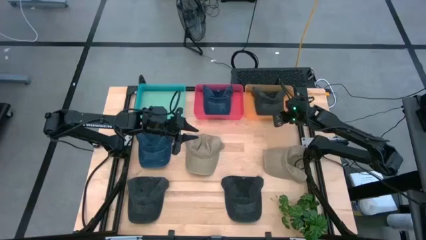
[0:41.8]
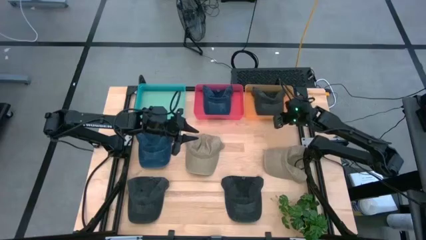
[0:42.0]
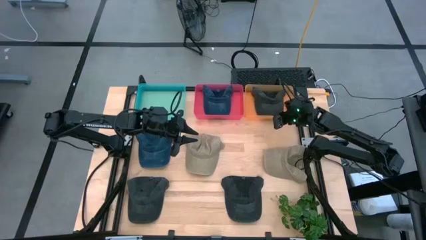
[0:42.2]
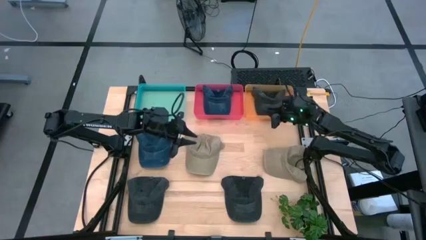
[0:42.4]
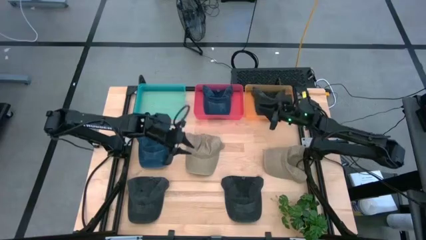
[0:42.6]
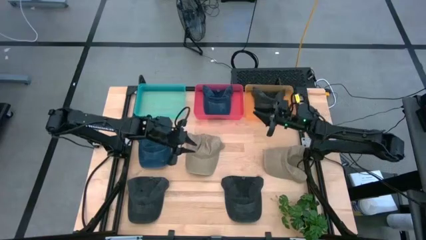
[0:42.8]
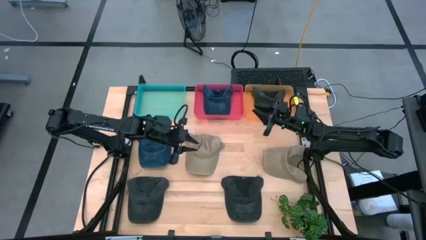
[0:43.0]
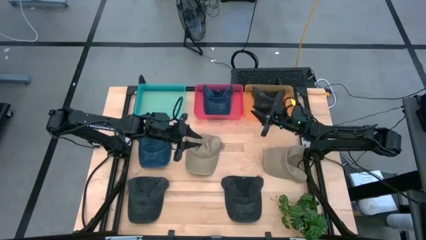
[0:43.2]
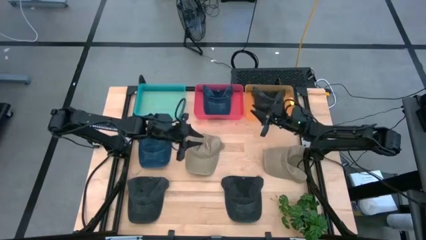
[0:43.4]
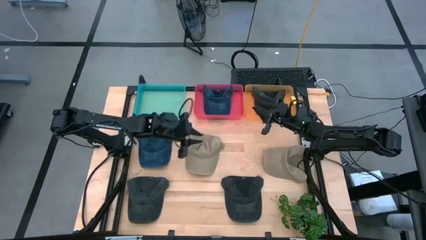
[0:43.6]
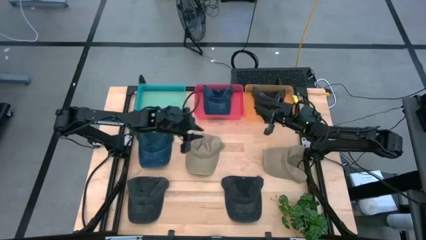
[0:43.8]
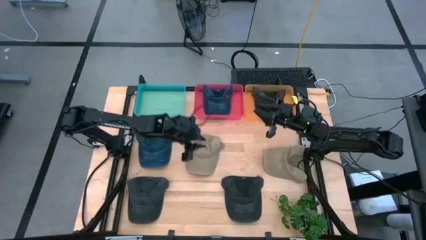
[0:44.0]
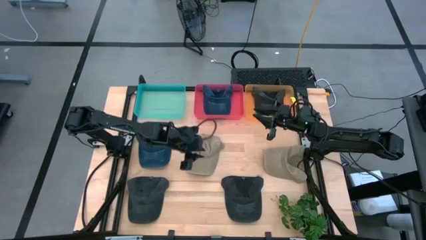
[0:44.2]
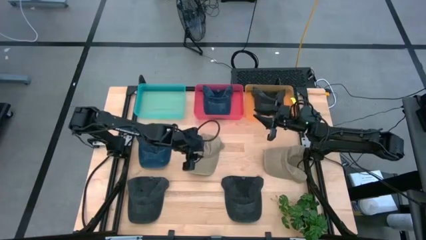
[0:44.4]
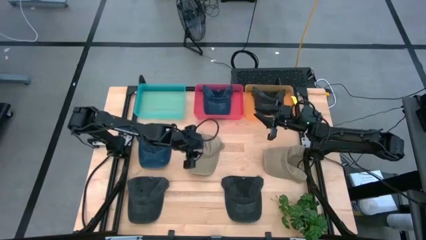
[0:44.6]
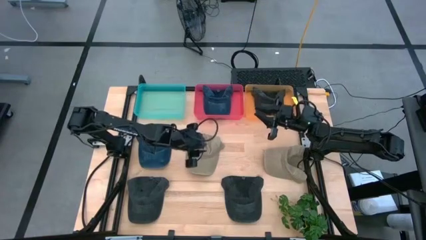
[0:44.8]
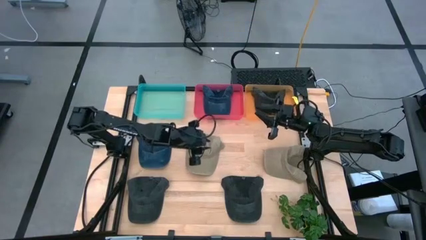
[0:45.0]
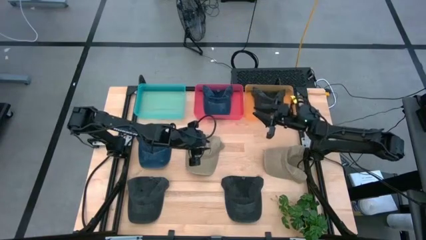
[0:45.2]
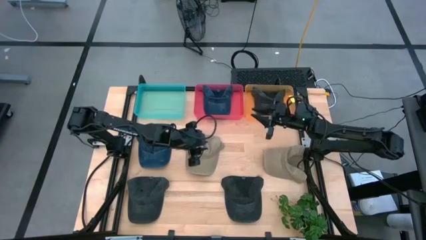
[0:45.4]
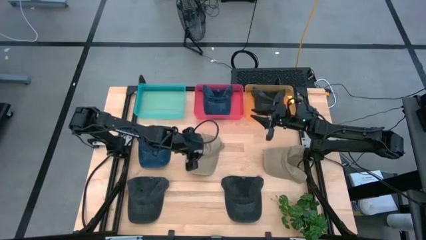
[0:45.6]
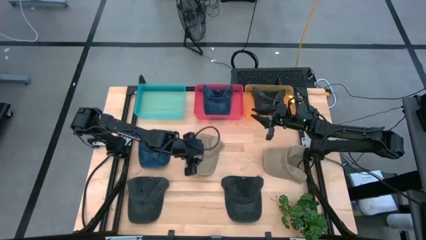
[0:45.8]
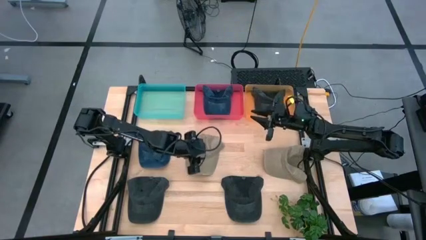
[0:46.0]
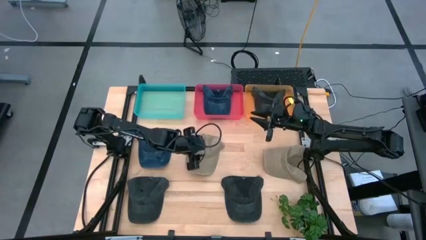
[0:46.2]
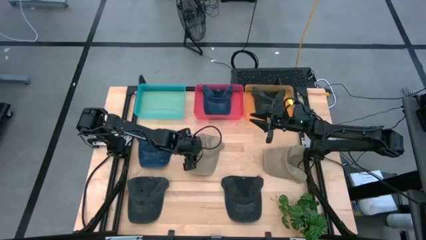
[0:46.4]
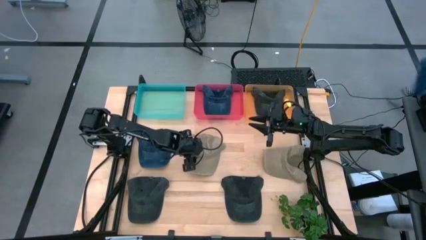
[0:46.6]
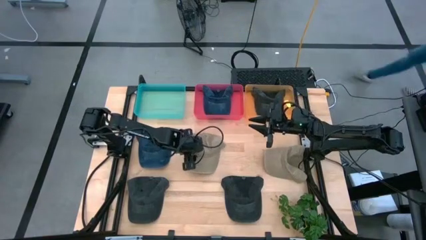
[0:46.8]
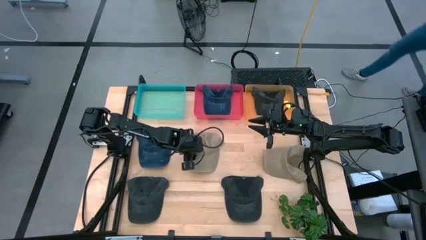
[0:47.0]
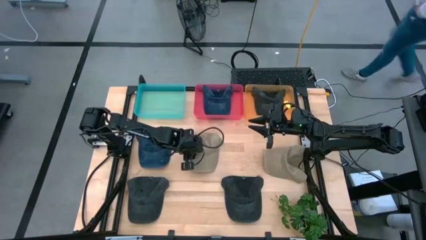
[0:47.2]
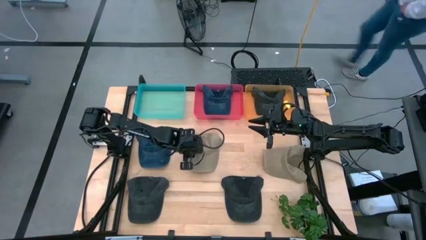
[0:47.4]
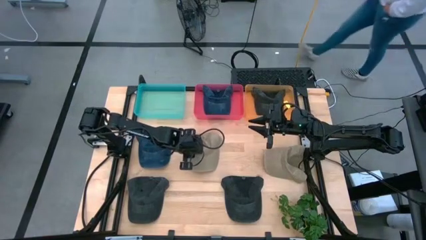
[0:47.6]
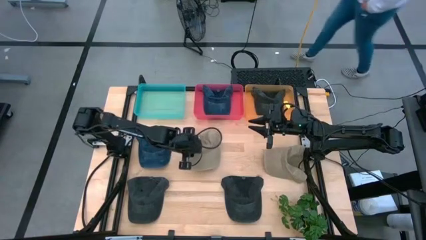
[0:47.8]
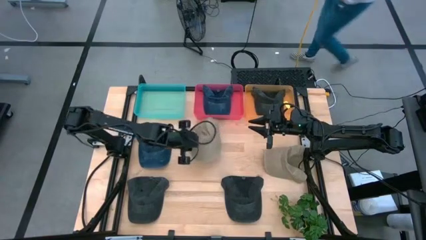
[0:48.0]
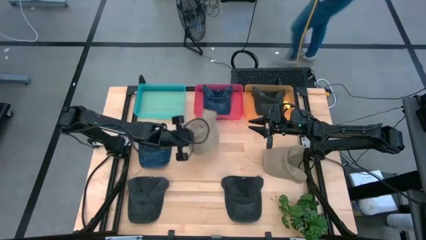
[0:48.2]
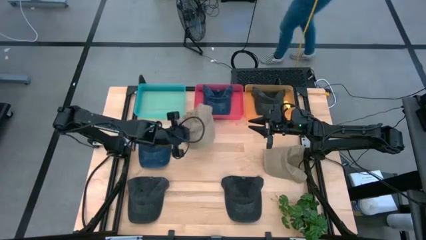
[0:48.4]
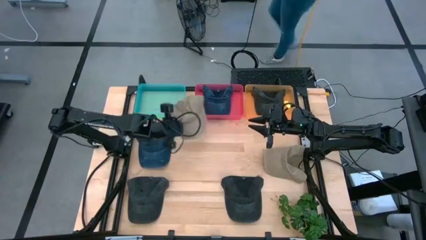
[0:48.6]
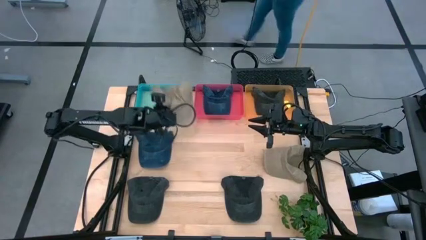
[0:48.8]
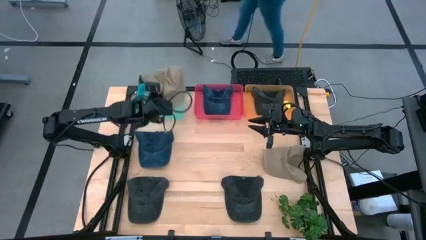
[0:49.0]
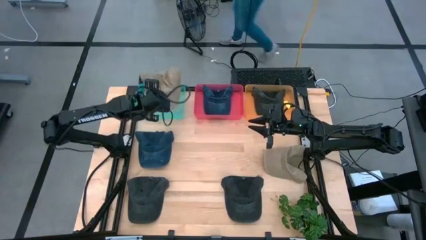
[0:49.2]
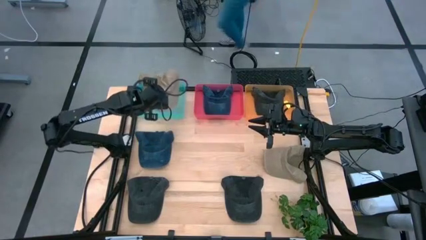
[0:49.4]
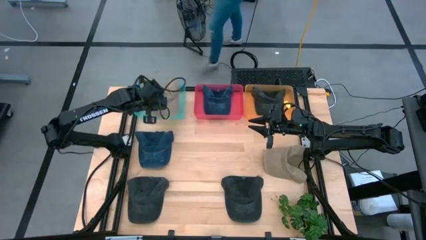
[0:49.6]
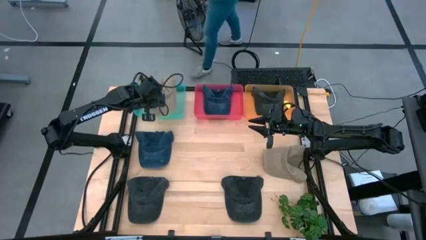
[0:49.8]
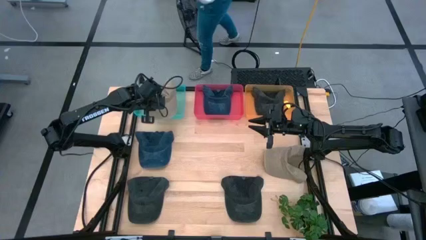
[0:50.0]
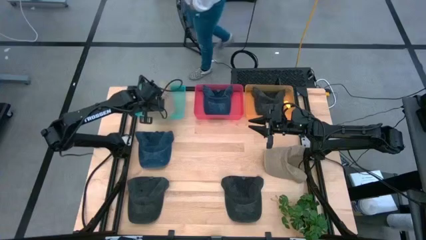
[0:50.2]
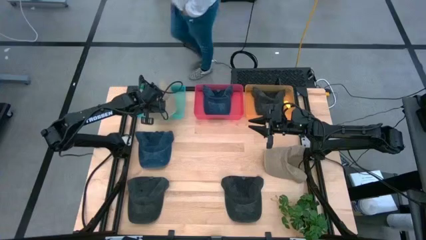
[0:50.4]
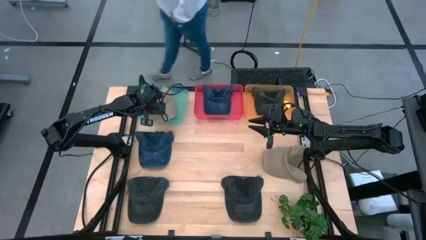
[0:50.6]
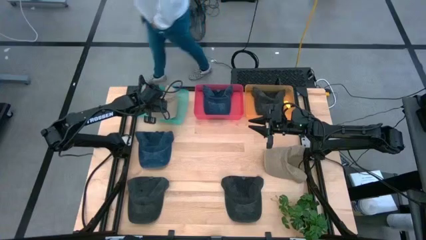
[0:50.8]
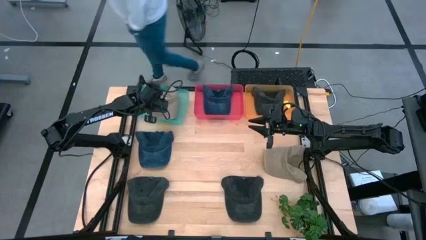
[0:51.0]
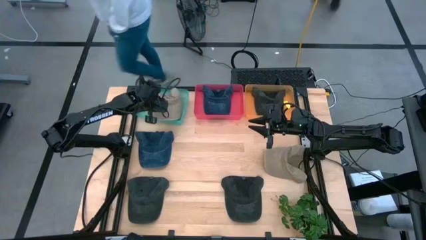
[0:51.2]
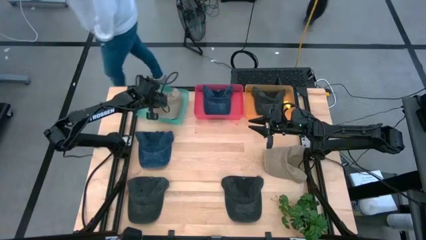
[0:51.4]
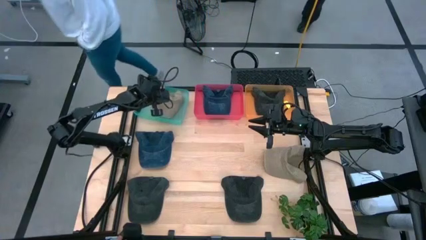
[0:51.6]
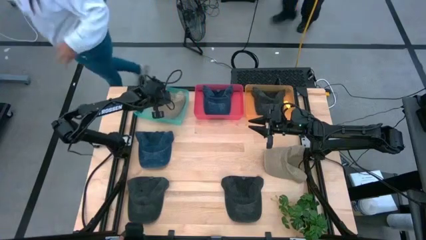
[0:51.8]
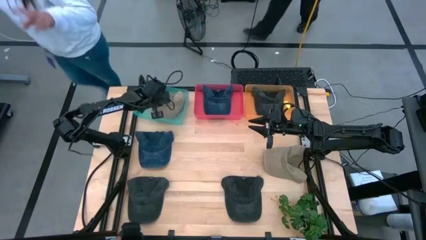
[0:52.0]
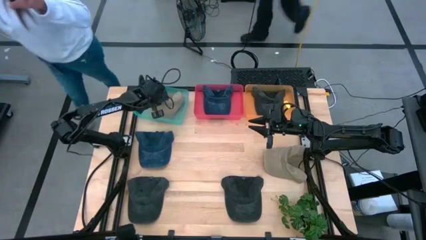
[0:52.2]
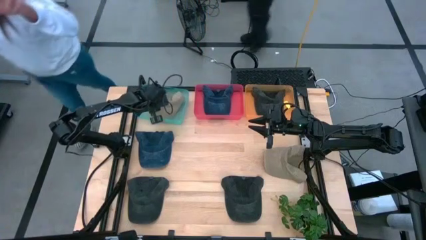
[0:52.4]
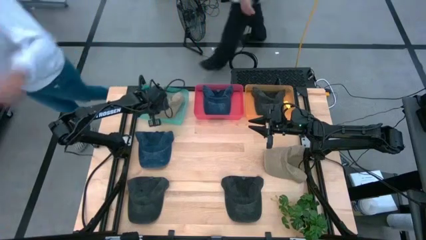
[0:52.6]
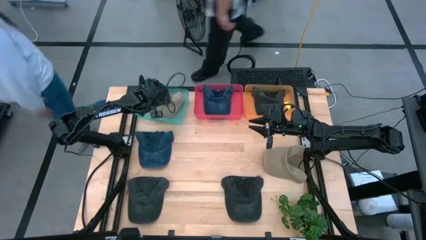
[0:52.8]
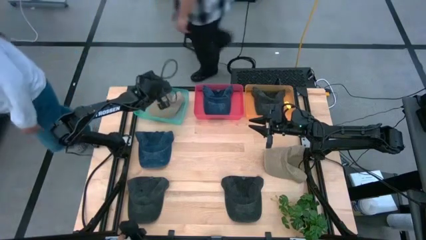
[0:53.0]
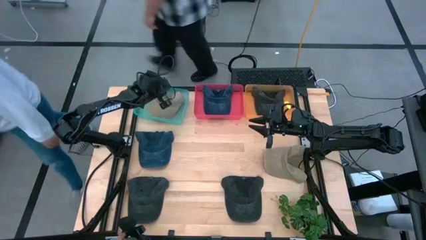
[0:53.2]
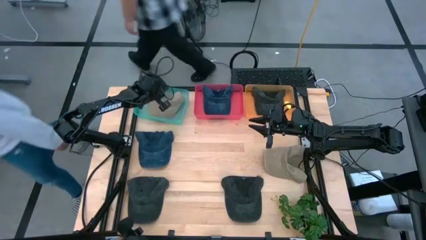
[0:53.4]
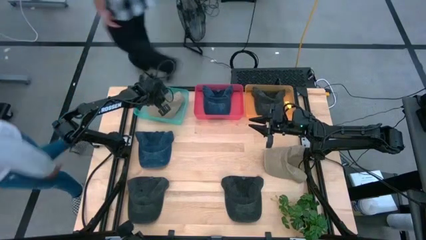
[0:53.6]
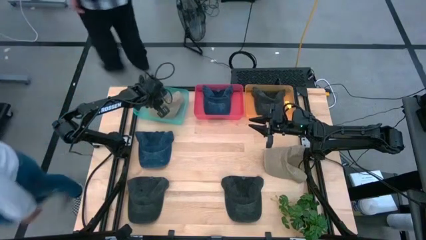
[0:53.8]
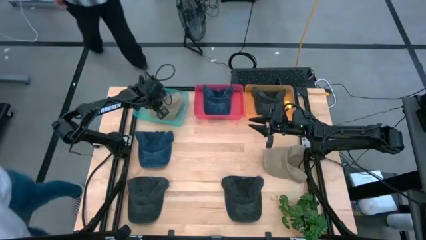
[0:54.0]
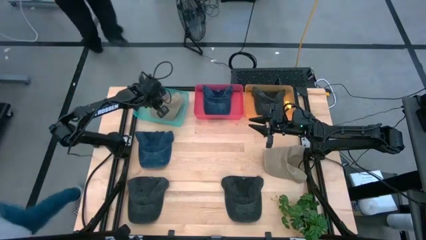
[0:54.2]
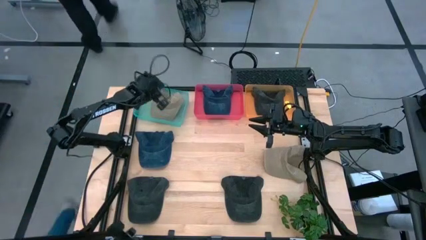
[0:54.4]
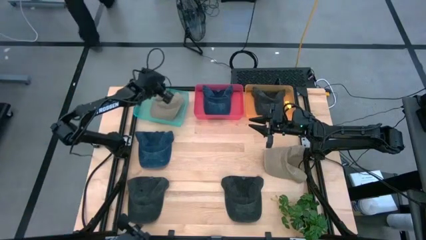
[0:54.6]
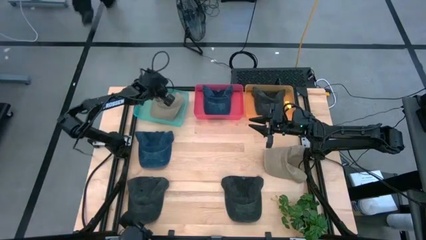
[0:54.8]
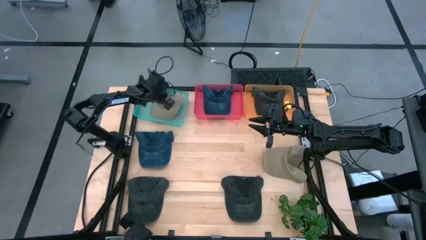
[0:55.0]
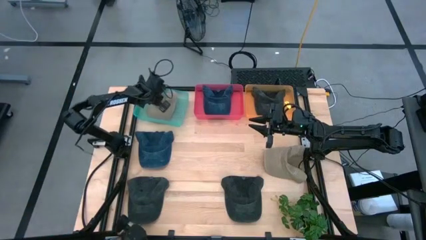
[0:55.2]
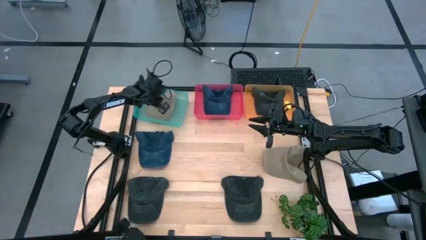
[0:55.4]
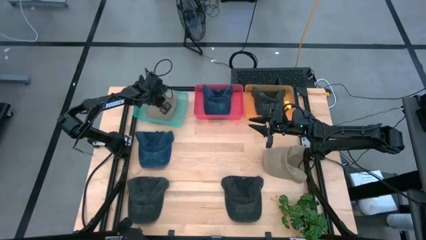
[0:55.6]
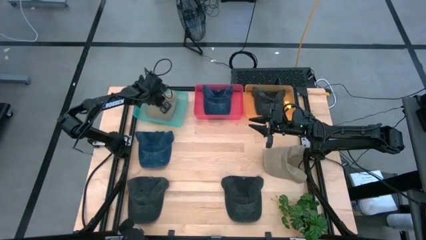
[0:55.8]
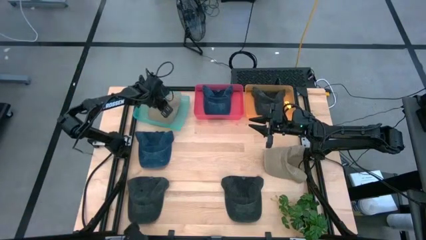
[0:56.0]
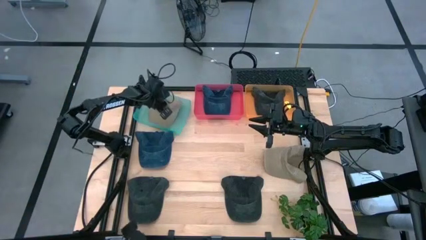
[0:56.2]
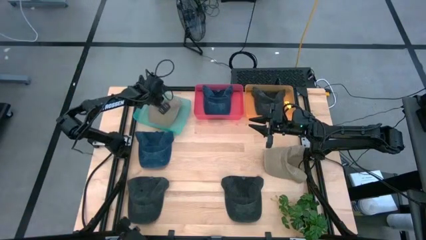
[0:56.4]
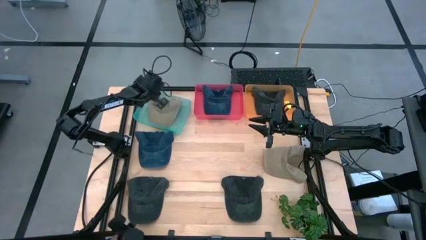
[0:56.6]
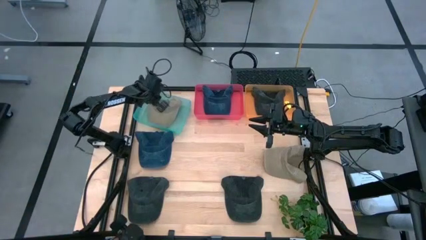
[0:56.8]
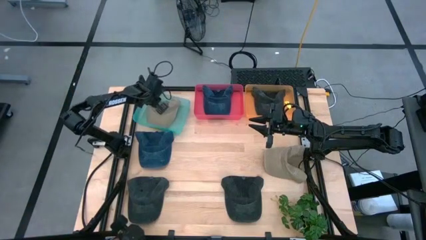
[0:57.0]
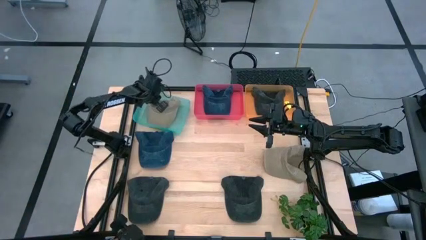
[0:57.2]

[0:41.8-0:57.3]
Task: Pick & Place hat
Put the left brown cap into the green bin

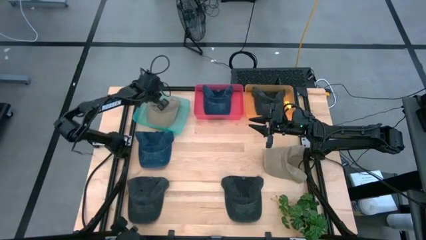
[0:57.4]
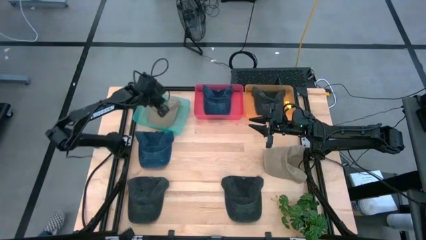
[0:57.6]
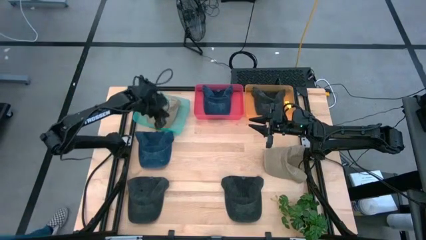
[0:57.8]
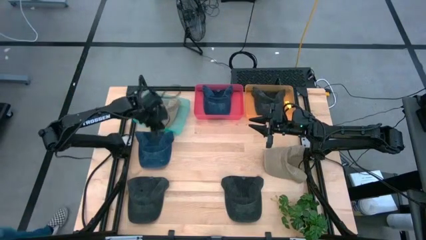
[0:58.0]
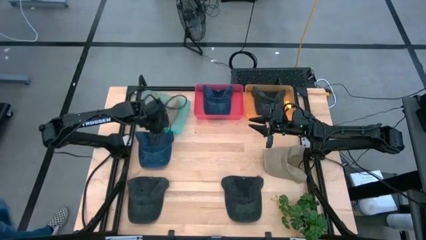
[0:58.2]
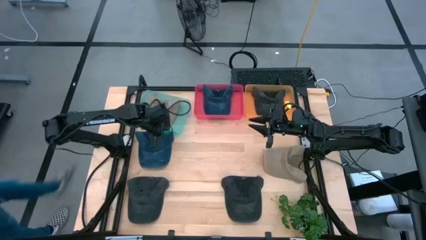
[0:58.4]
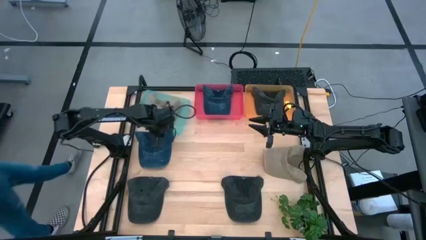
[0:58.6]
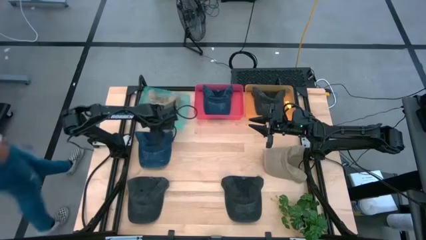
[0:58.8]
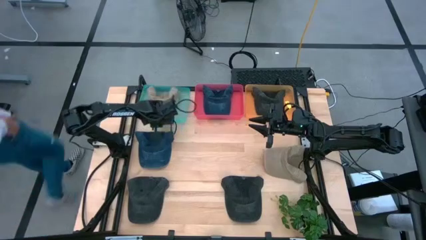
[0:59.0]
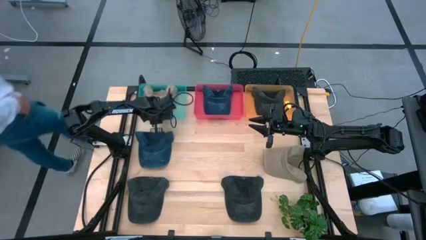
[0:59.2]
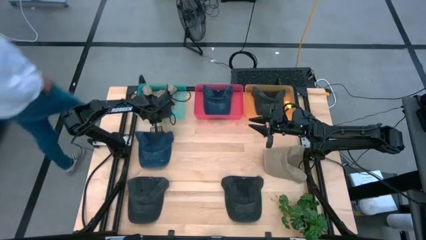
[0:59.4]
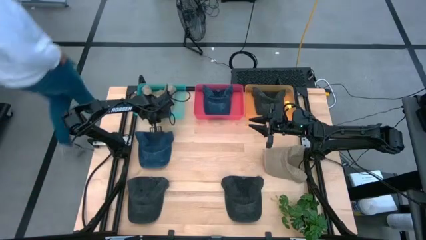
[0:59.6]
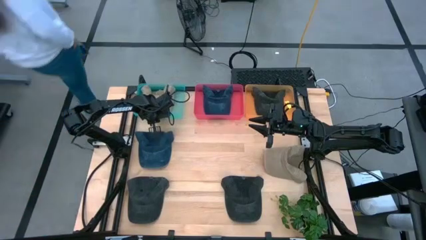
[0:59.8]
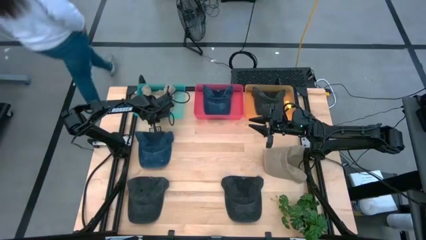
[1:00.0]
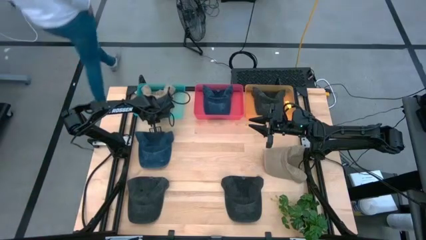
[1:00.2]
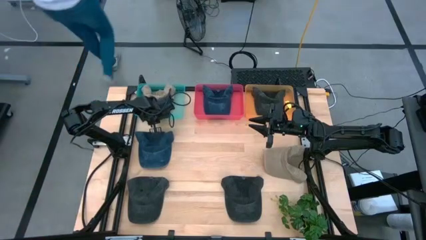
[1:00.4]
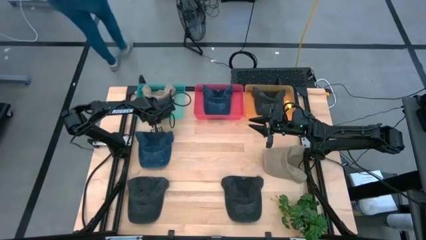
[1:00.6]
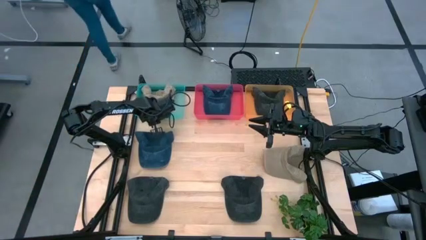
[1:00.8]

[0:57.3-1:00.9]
Adjust the green bin
